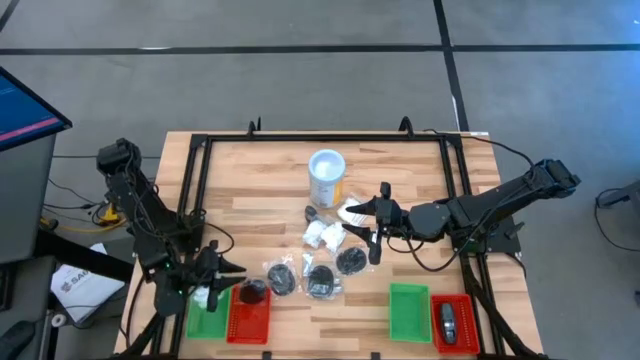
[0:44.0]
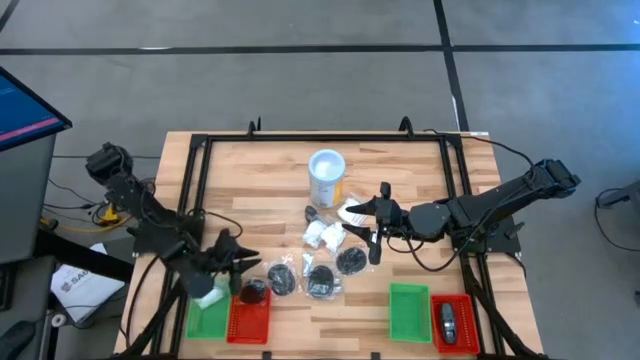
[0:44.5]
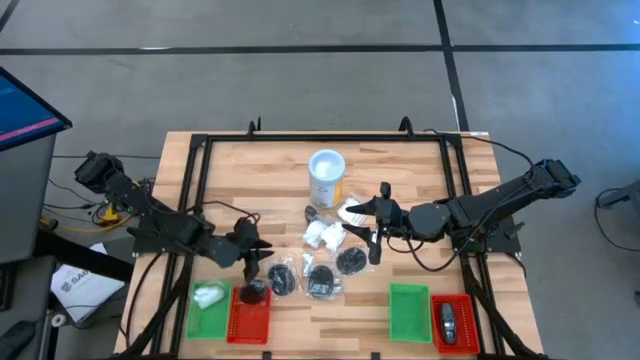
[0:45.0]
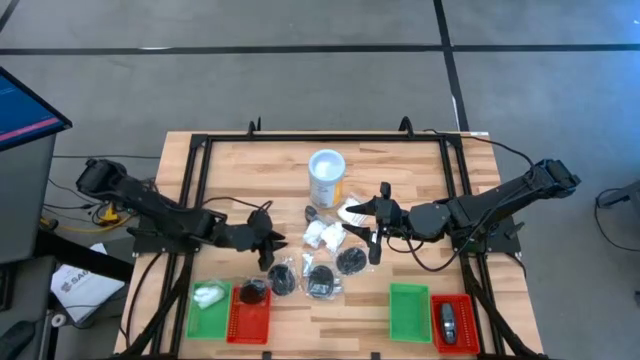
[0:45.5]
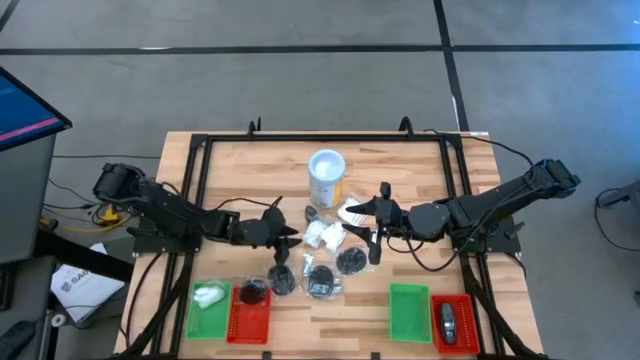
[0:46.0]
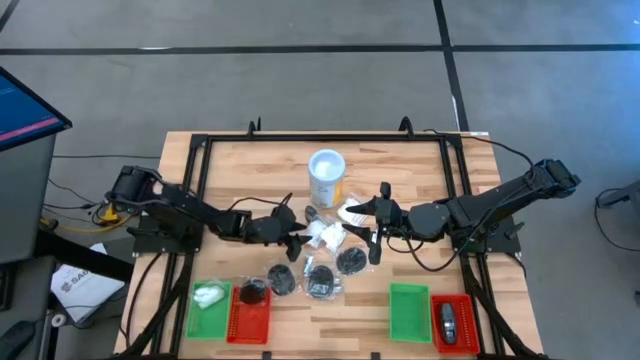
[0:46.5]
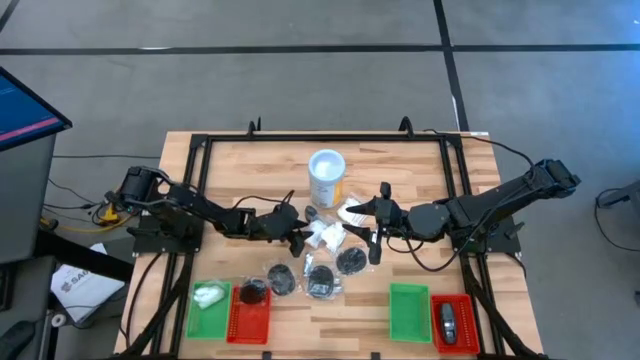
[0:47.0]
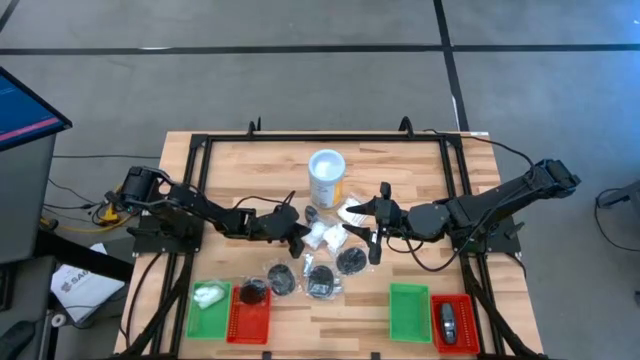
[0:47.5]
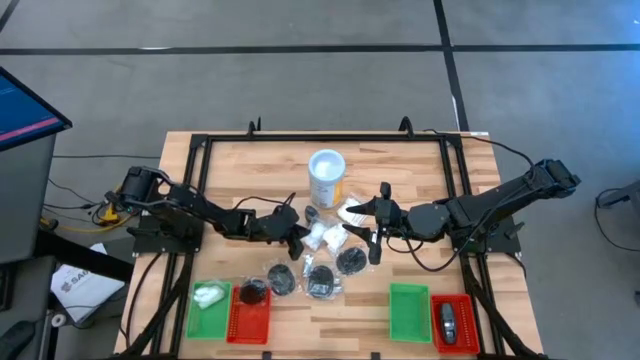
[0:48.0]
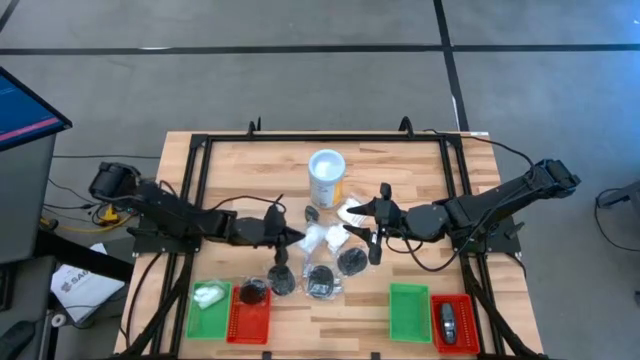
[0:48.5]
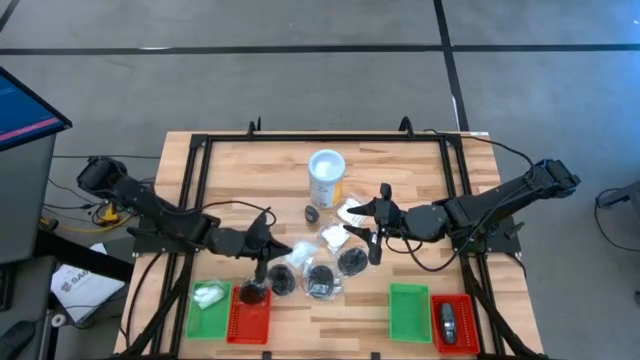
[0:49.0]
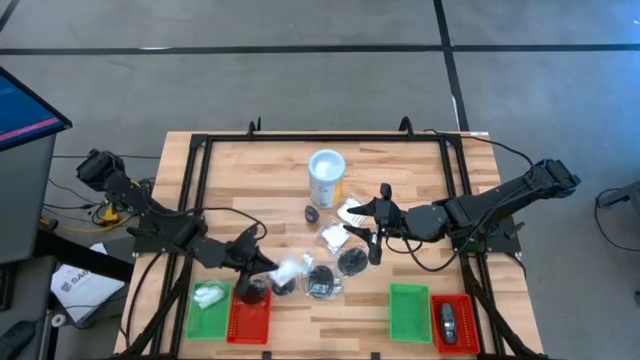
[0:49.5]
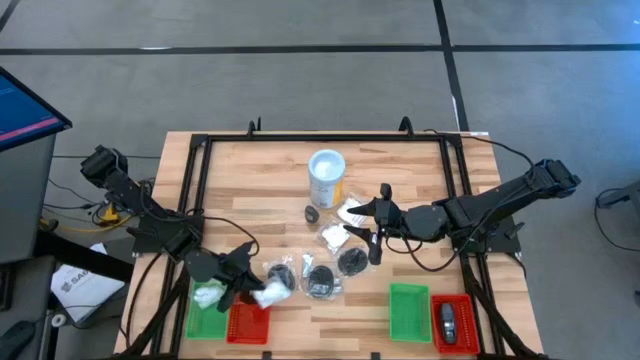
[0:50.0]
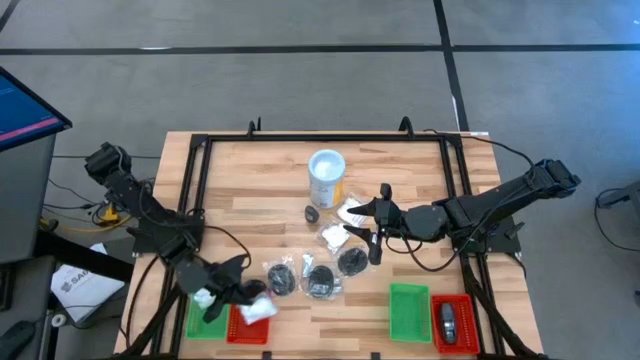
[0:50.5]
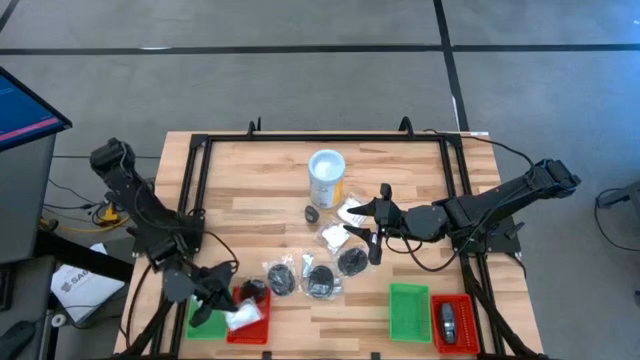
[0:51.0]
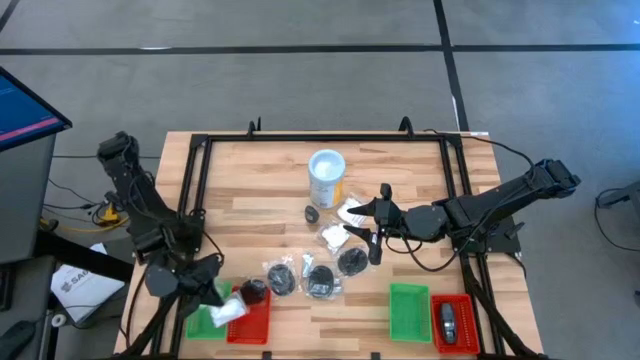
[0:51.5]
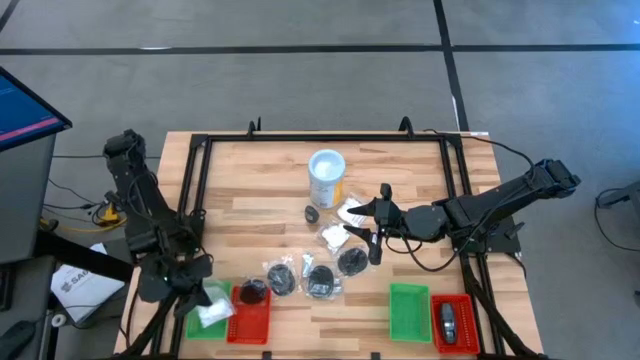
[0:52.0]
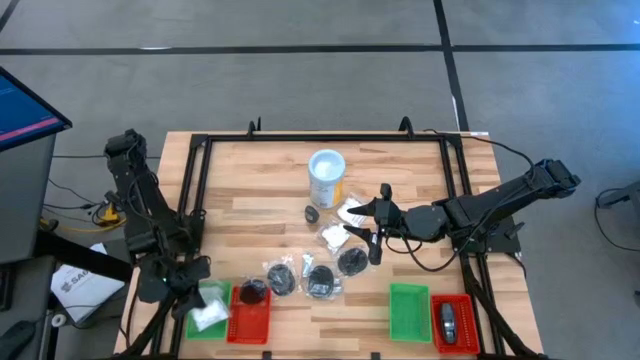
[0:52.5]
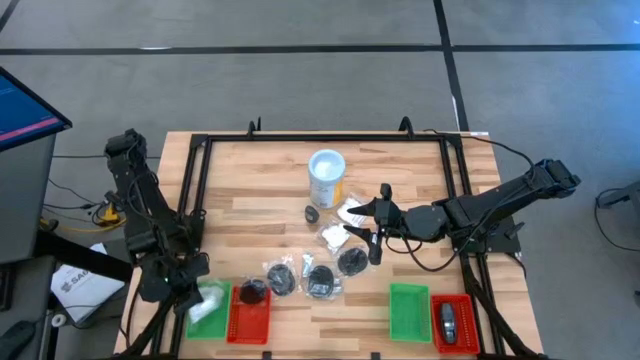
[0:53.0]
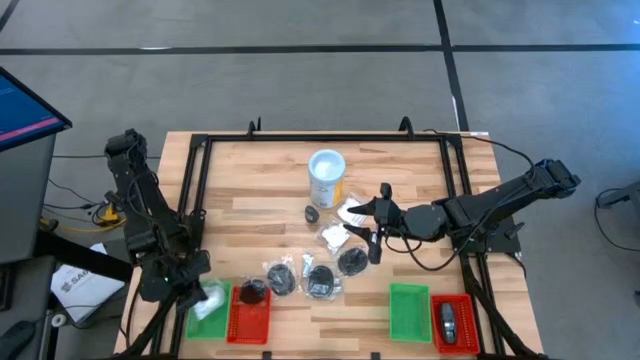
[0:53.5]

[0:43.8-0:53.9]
Task: Pick & Place Travel size toiletries
Put the cotton pack into the left green bin

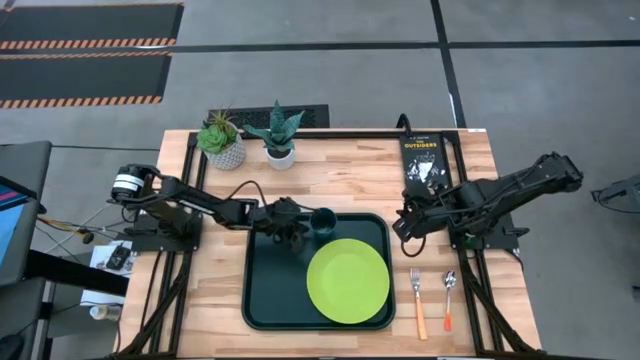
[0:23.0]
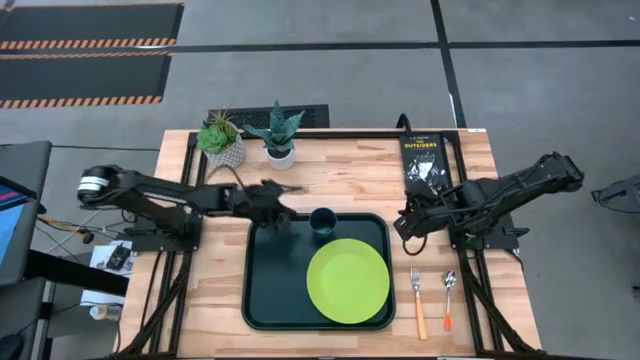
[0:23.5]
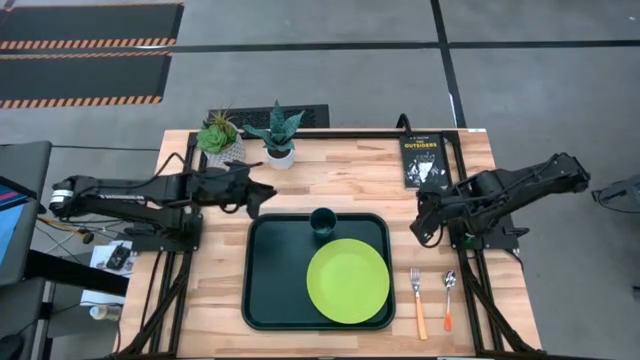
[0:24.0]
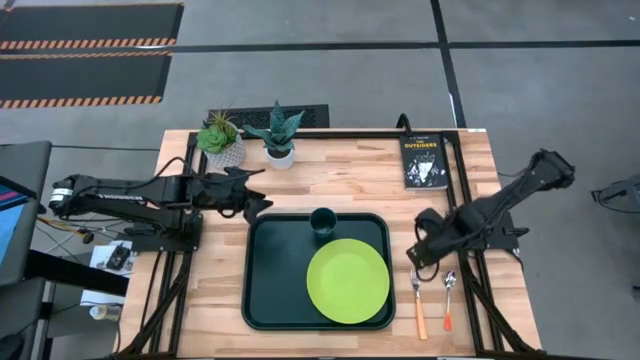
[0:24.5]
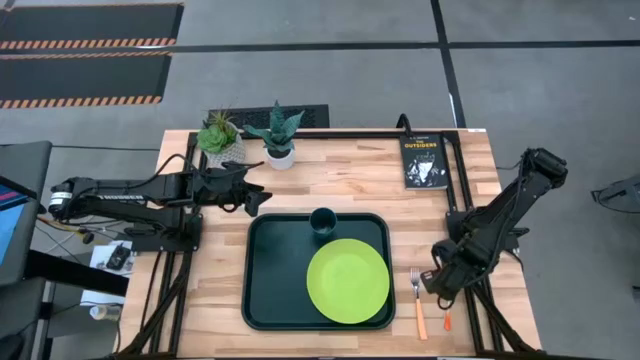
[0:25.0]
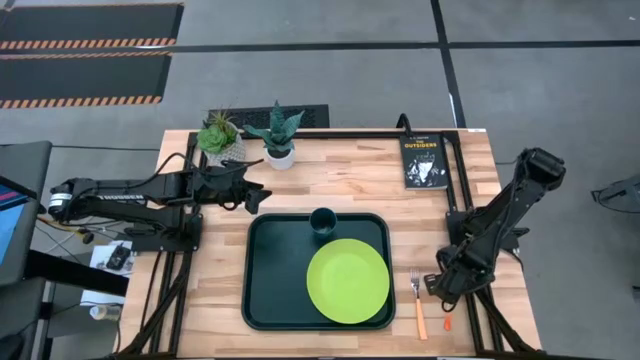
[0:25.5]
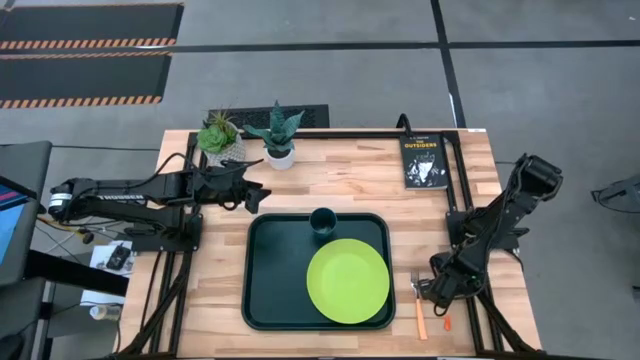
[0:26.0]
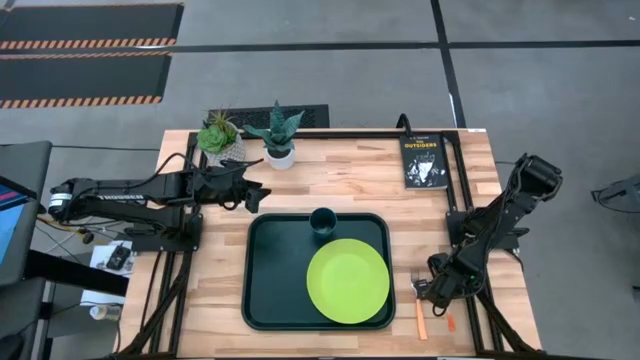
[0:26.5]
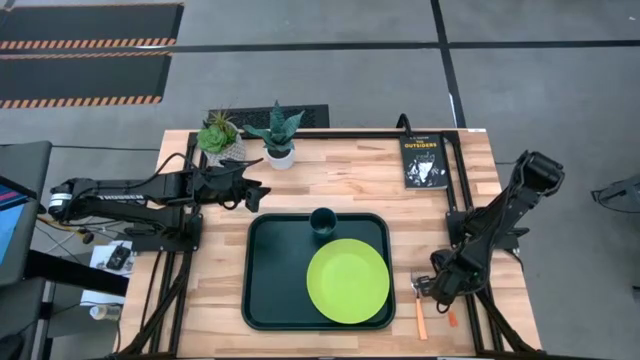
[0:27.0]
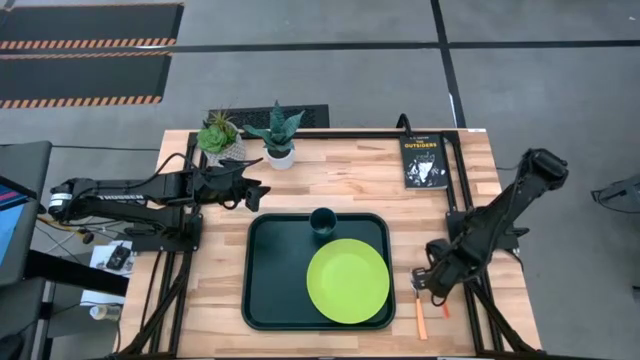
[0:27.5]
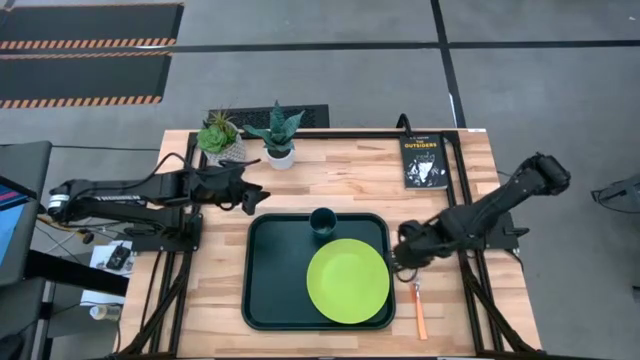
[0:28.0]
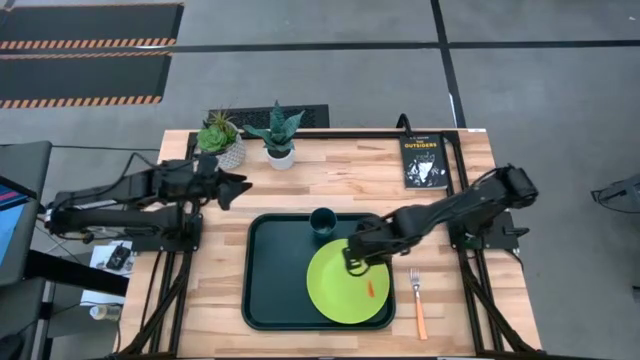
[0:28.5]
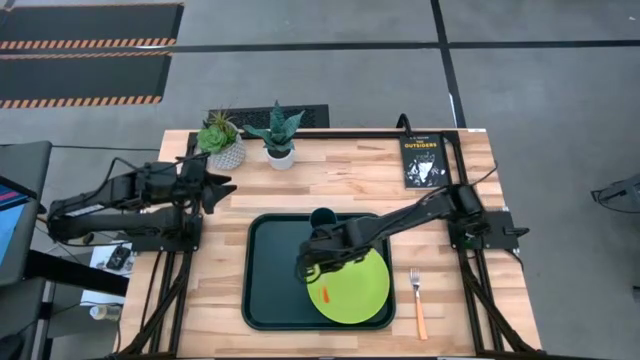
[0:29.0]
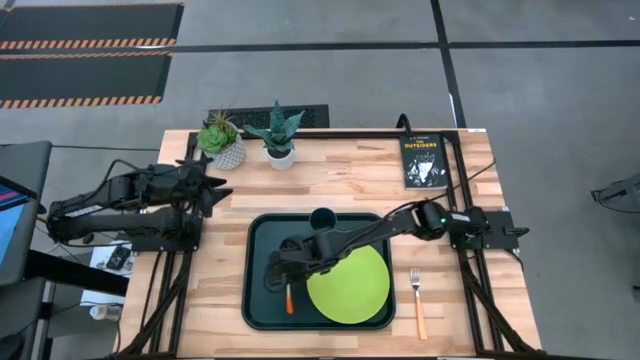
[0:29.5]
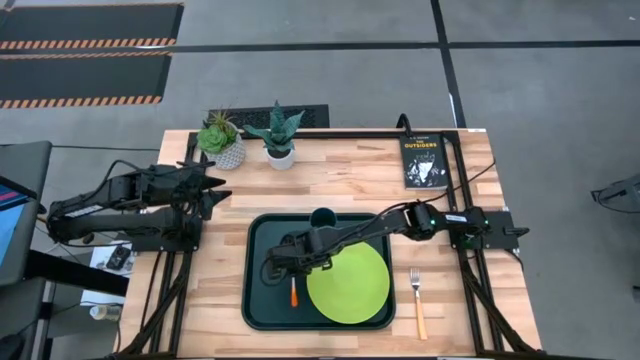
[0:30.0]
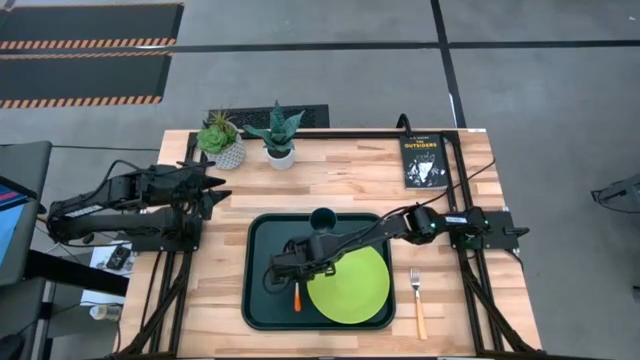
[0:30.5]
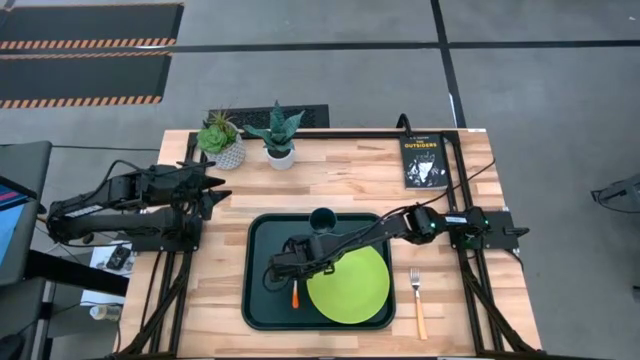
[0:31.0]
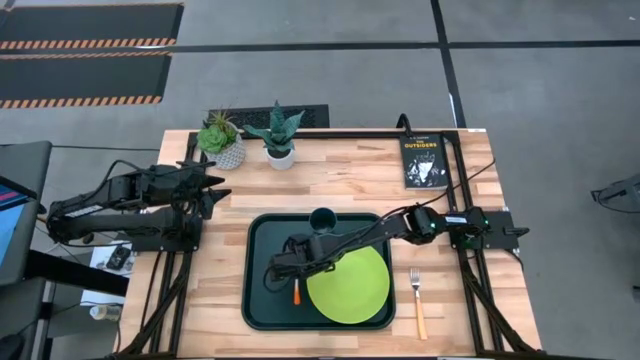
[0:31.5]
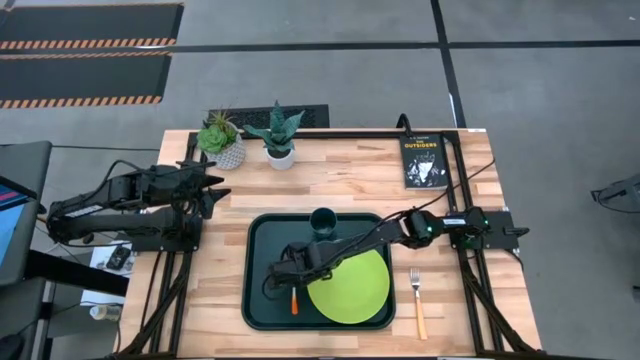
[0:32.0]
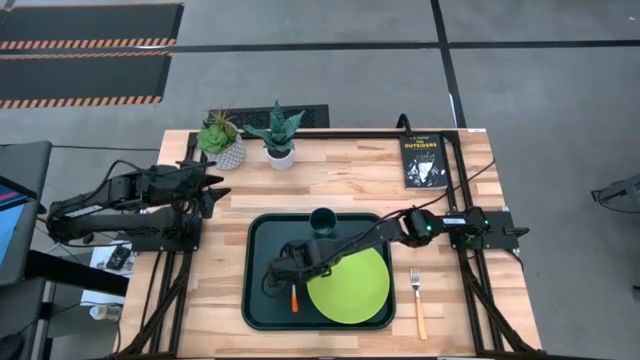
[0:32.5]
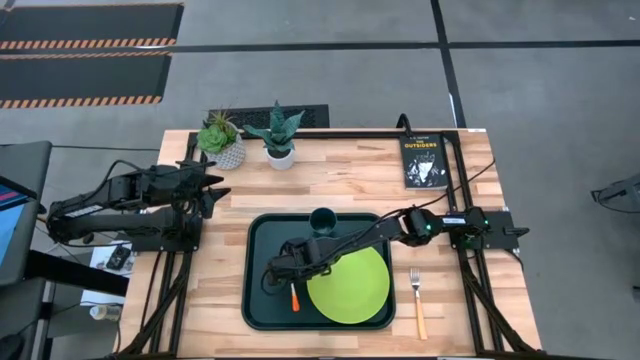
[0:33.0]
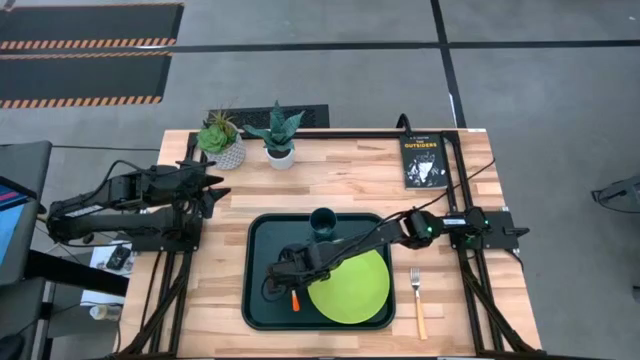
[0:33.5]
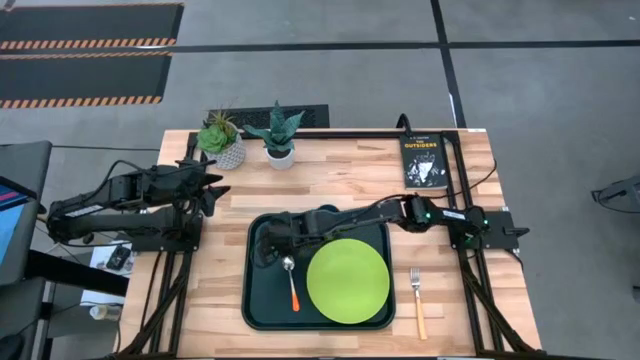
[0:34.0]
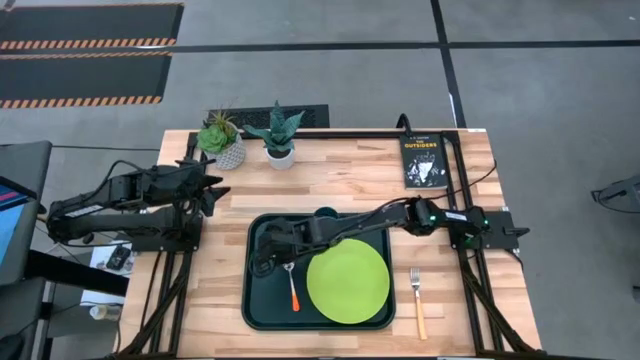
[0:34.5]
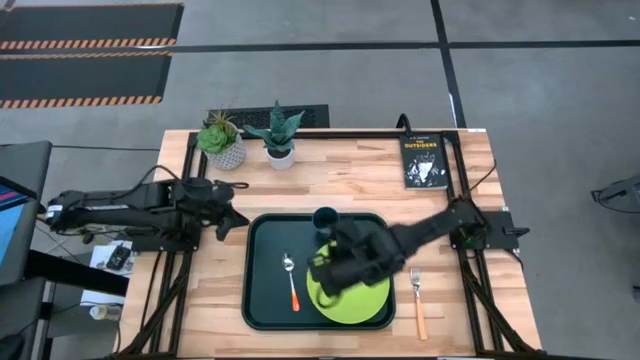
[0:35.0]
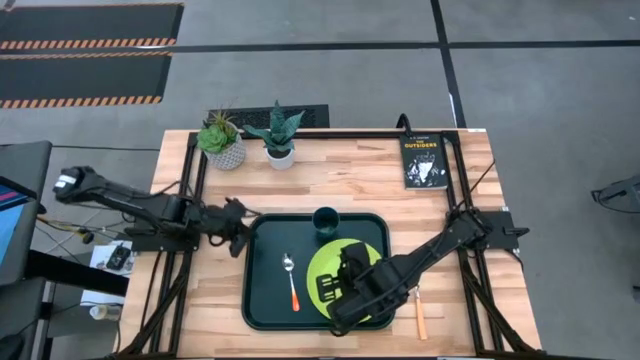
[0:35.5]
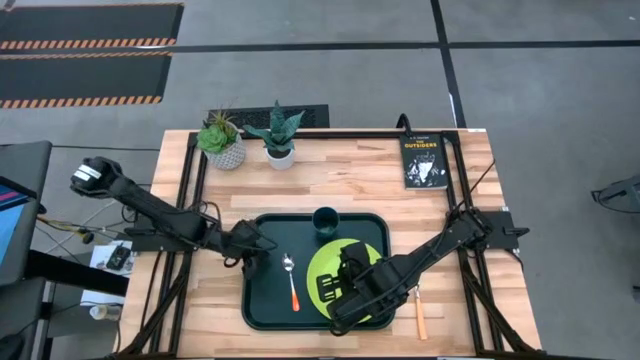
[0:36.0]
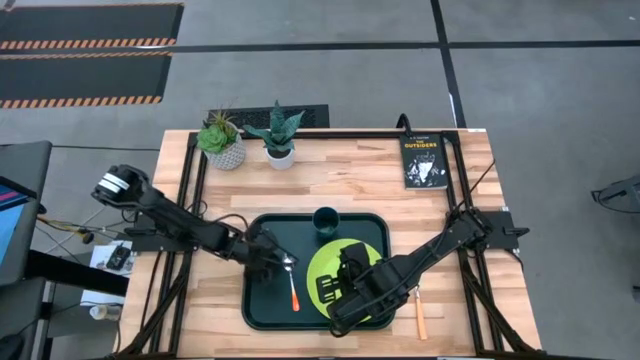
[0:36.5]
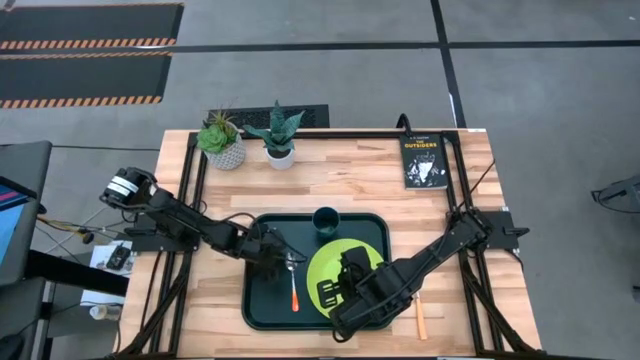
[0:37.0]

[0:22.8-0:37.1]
Task: Pick and place plate/cup/fork/spoon on tray
Put the orange spoon on the black tray to the left of the light green plate
